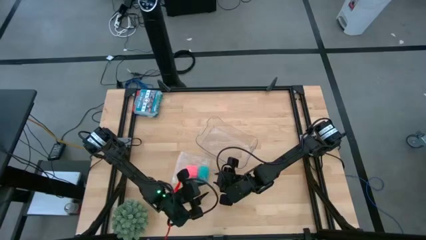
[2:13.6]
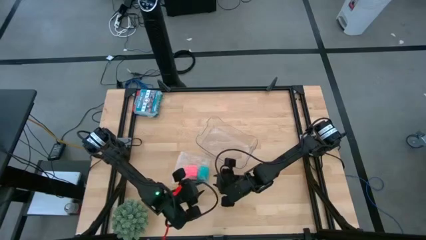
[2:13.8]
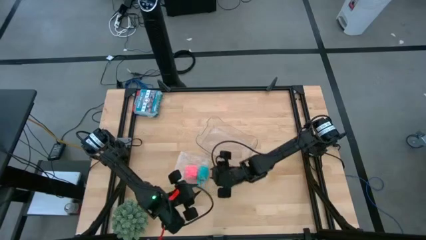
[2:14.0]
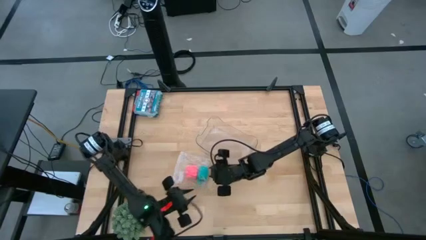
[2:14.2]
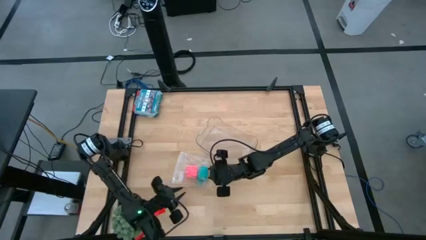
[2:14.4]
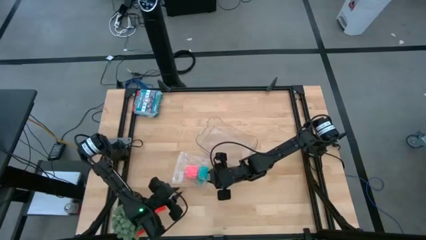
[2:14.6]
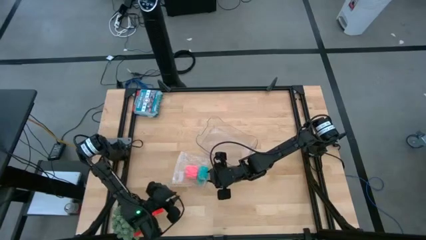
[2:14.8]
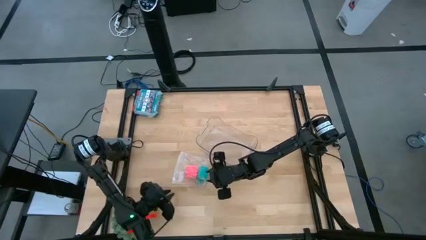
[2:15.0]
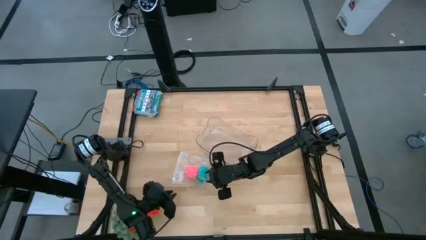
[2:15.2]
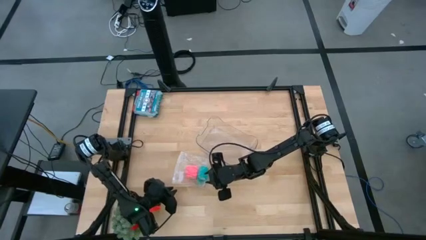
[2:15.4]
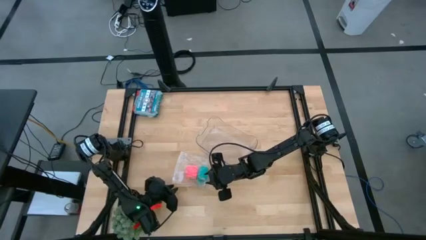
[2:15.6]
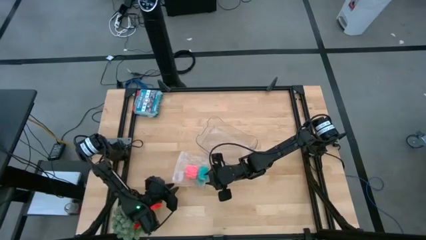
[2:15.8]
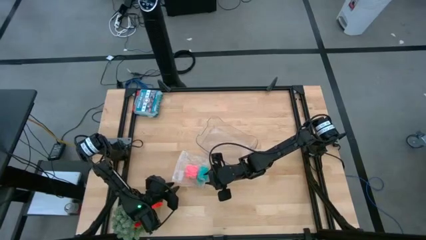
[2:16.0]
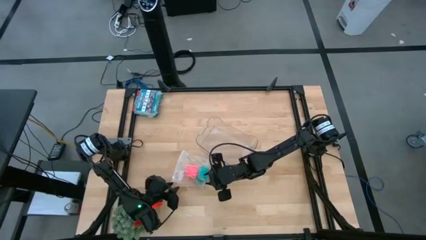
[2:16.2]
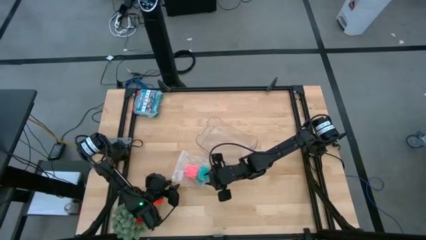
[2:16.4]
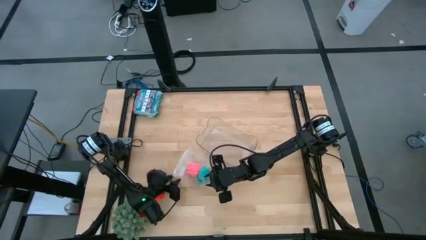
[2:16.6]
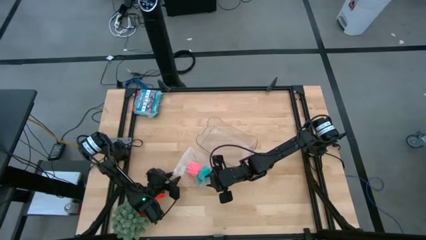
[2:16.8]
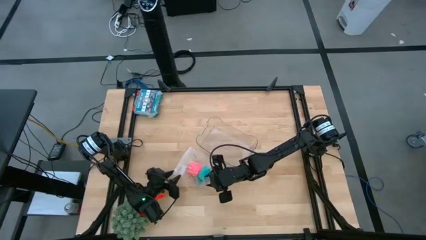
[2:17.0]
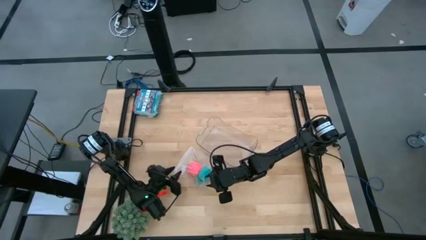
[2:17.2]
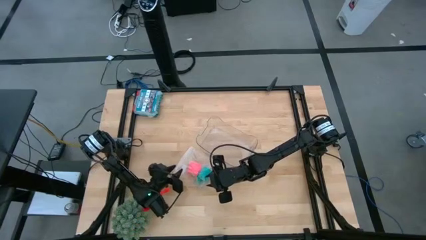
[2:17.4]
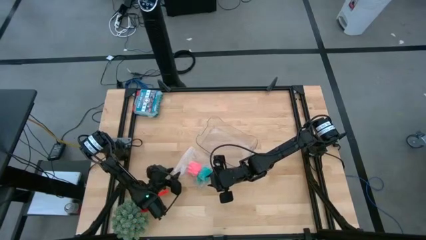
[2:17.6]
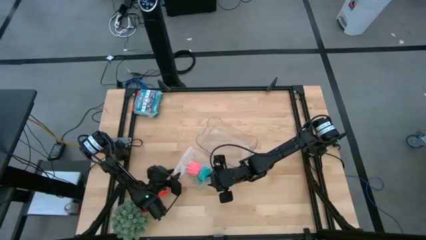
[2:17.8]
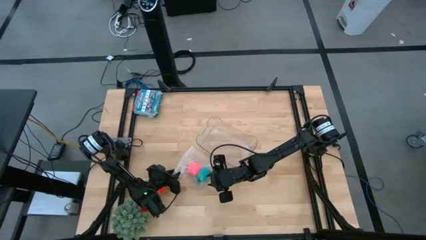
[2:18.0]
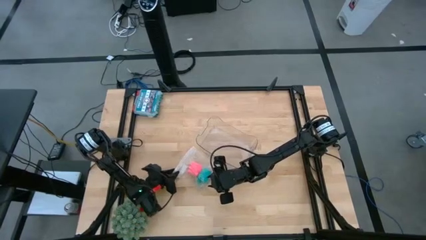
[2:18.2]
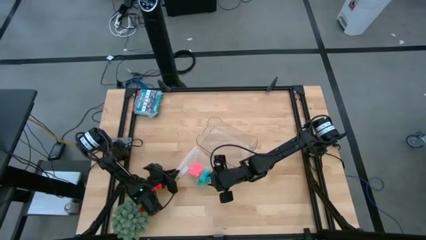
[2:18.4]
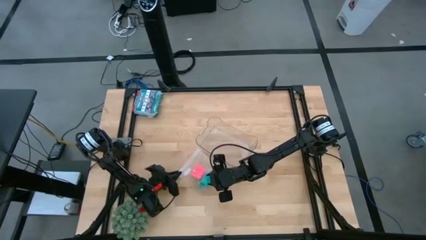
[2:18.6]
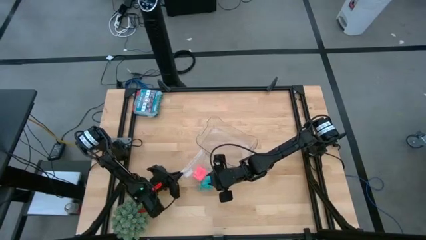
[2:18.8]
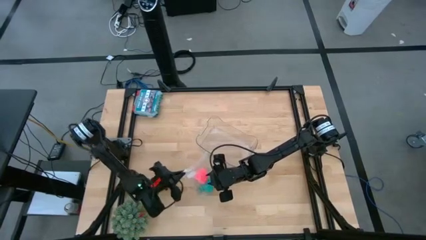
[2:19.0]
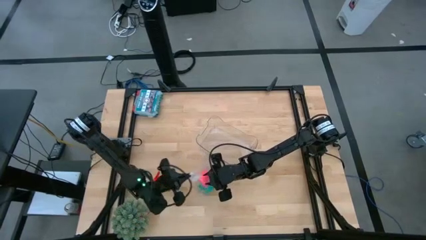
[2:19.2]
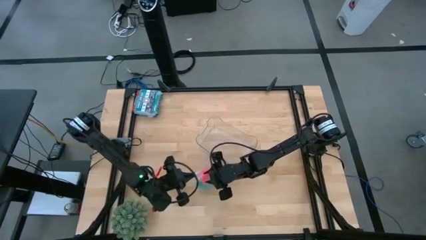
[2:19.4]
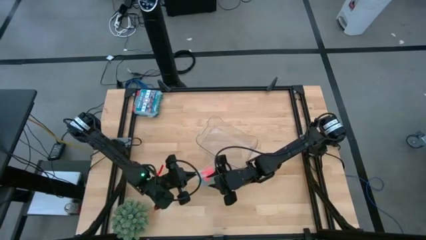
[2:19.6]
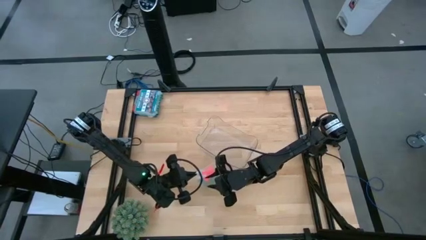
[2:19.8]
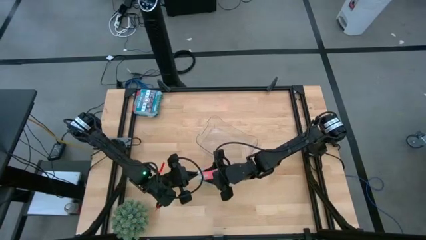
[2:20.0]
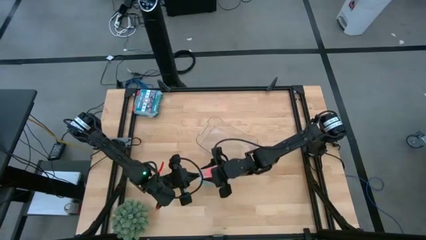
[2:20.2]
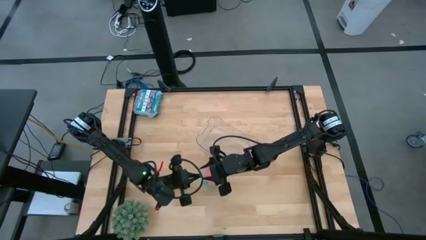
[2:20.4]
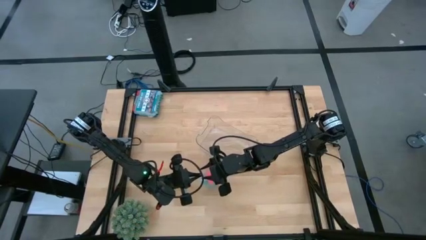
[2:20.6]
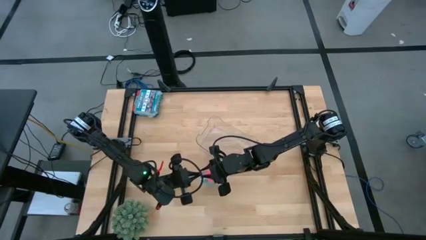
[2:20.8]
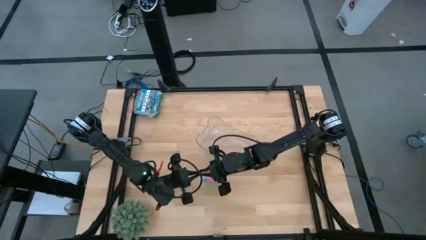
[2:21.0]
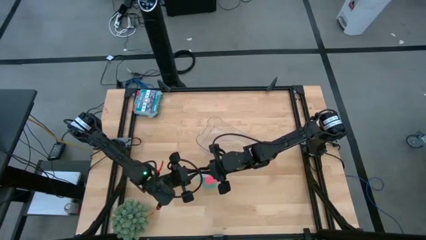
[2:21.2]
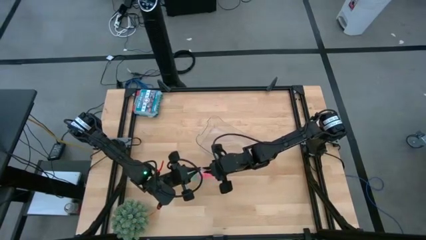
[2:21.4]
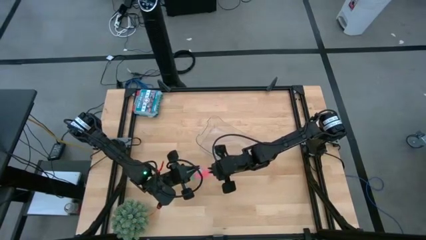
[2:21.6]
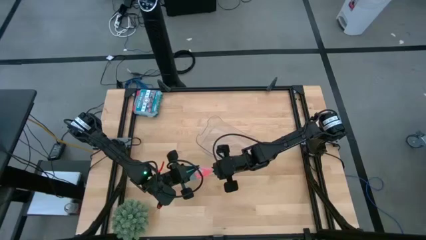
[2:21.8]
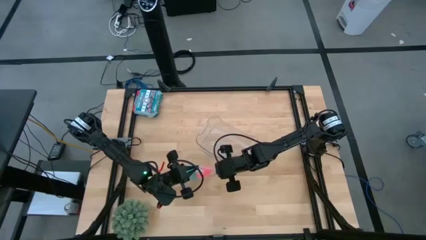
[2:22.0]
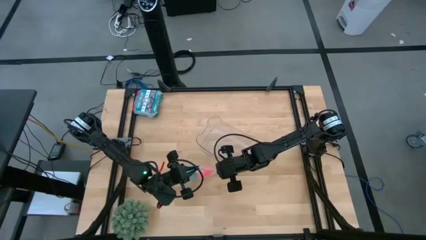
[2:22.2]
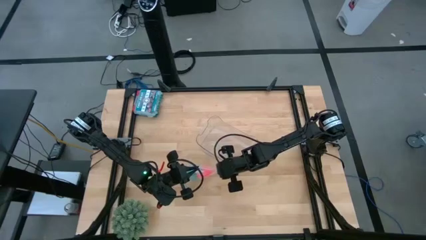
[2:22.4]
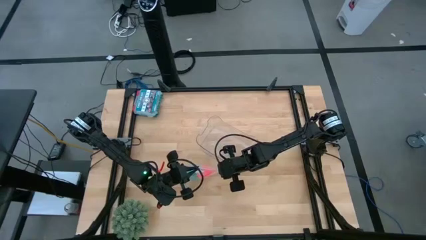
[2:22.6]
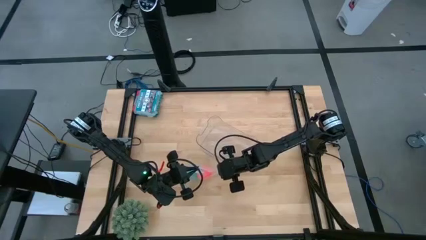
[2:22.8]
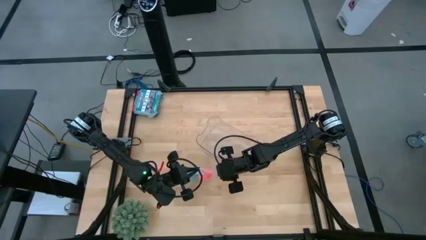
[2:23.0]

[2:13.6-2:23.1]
Task: Roll bandage
Close the transparent zip bag

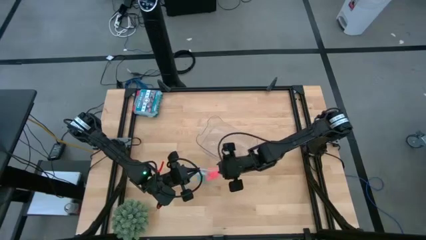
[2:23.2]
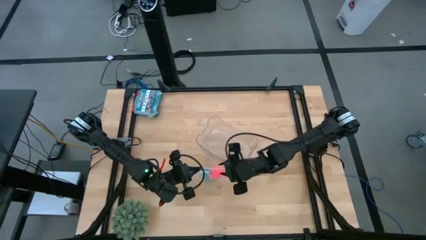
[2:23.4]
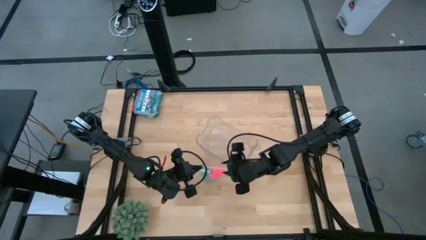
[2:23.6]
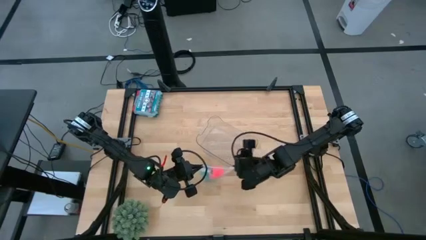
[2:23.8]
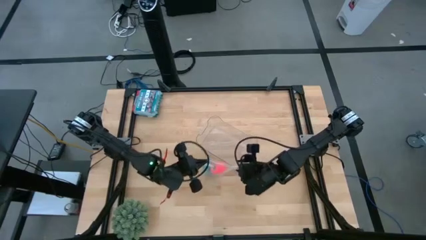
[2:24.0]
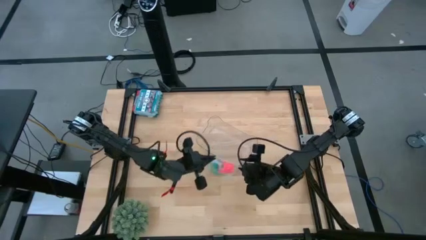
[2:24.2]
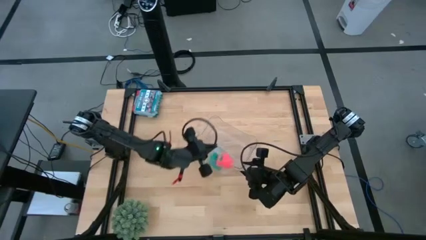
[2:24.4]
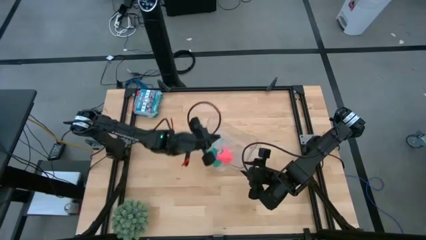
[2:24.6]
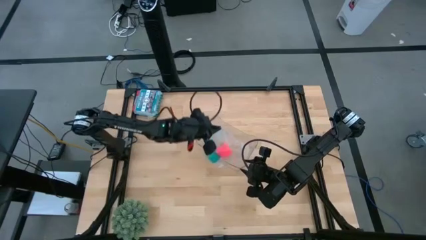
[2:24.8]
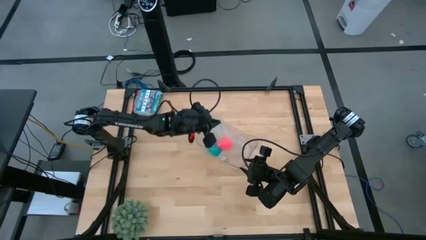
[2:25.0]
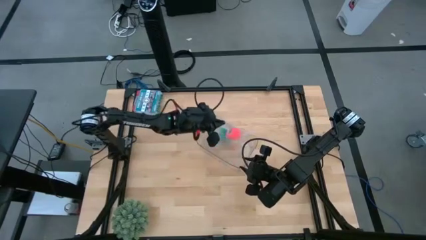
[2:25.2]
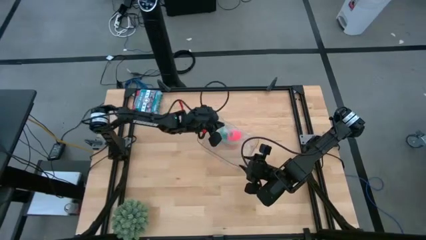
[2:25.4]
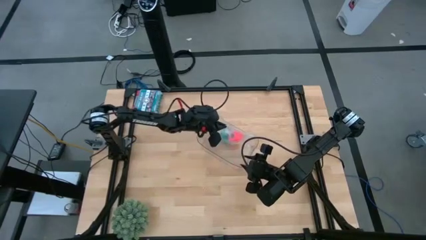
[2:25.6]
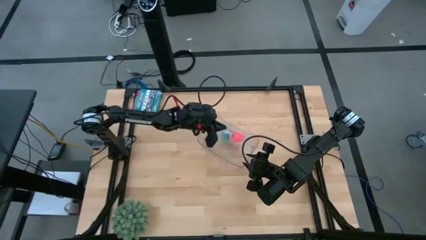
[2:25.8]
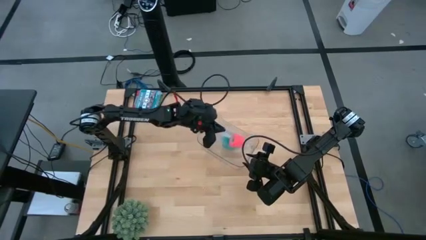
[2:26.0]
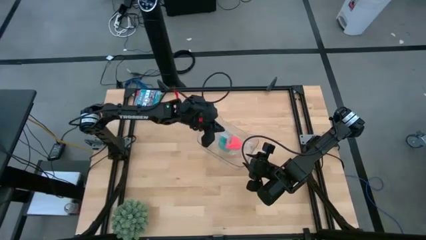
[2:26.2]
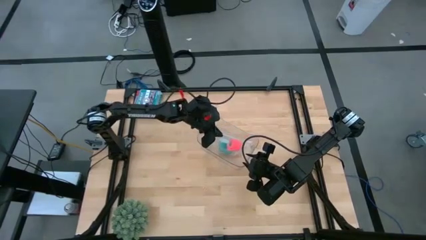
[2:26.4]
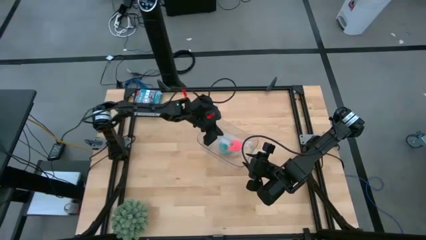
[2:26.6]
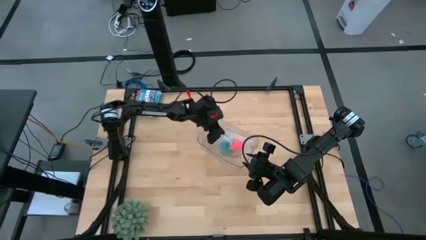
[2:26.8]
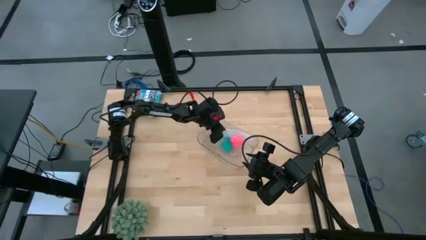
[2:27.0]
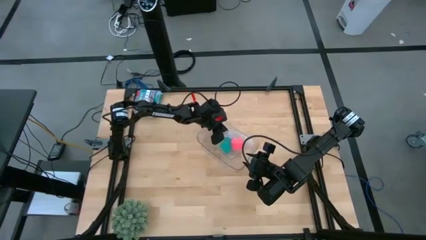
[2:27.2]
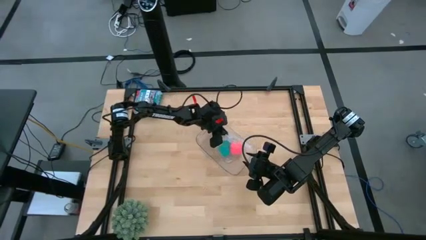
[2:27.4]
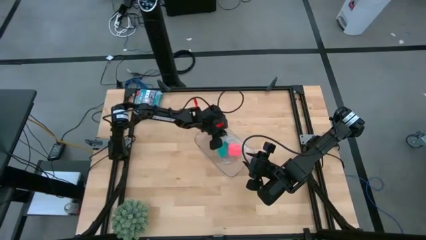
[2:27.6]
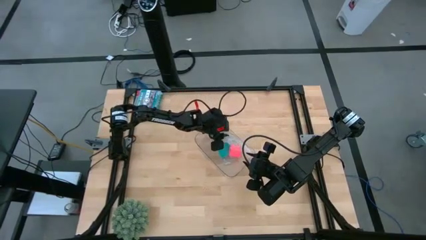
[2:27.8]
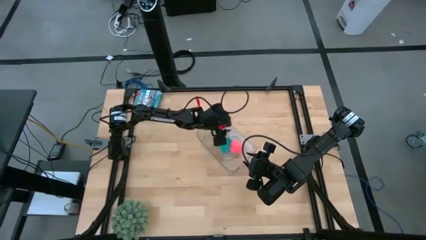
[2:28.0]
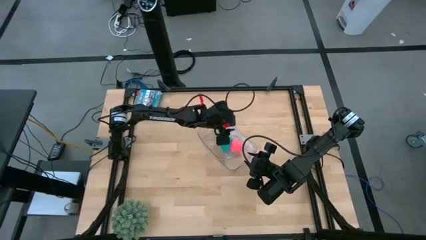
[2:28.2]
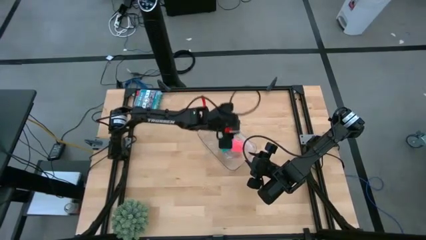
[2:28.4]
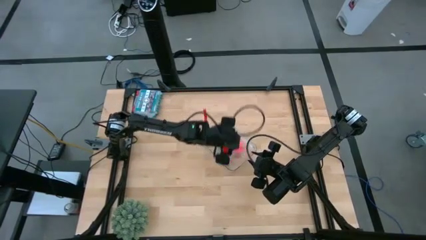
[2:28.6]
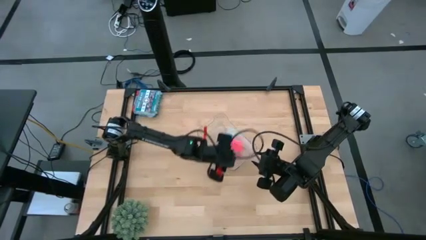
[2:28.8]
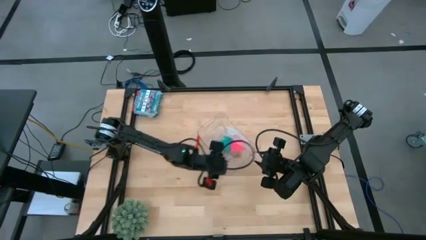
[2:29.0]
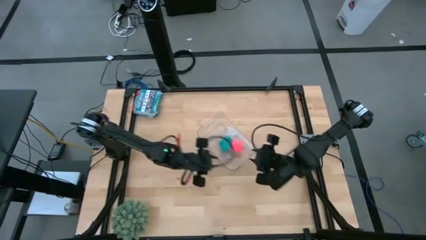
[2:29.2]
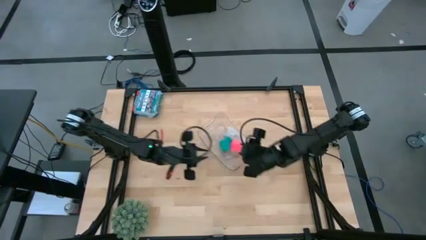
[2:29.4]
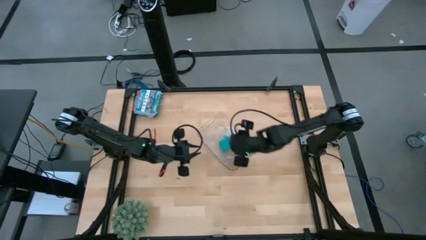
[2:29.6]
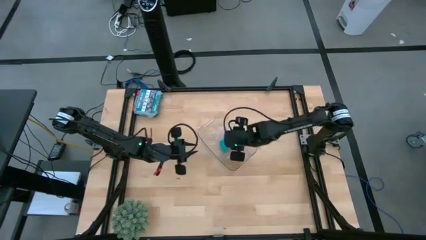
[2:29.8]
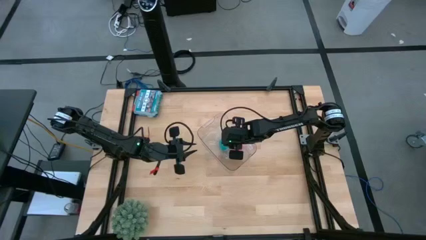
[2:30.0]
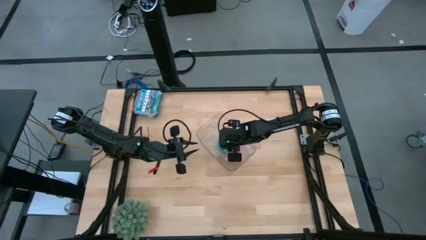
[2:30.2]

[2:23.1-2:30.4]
Put the transparent zip bag into the bin

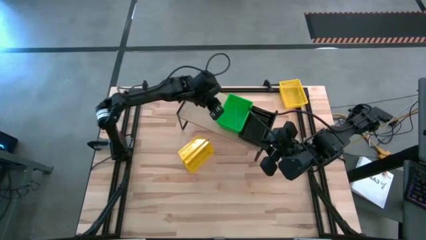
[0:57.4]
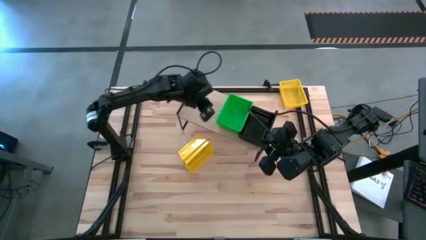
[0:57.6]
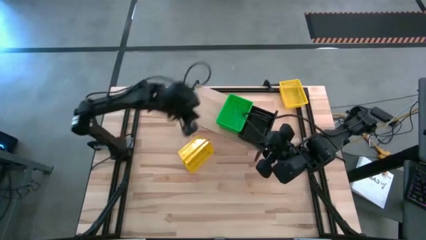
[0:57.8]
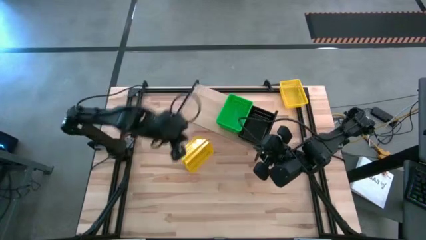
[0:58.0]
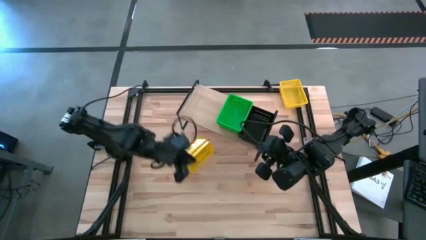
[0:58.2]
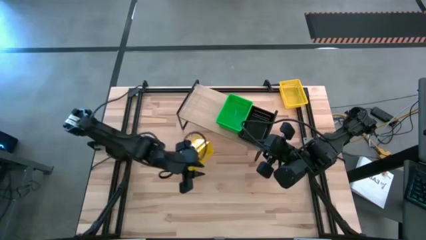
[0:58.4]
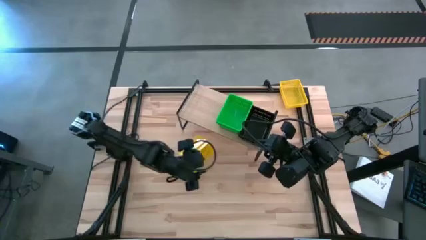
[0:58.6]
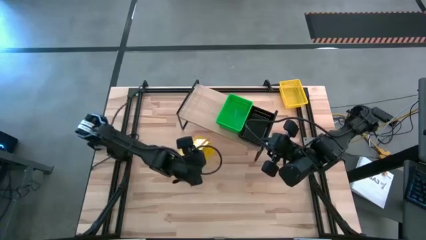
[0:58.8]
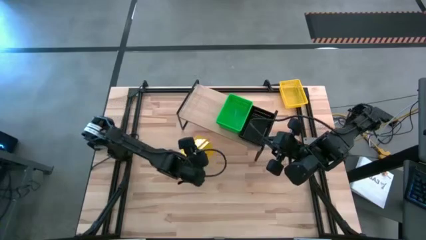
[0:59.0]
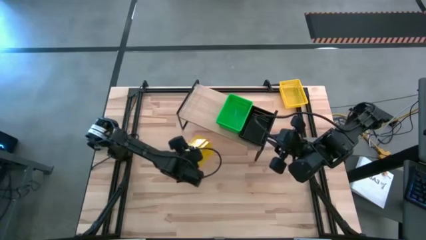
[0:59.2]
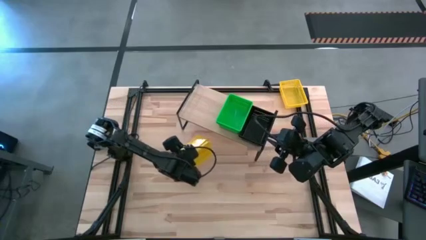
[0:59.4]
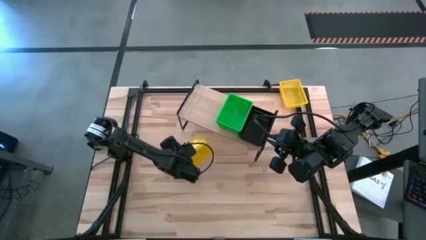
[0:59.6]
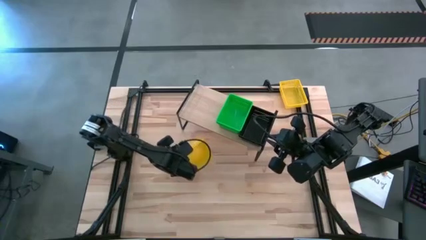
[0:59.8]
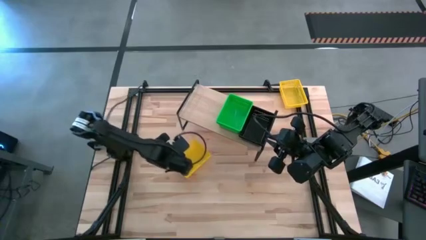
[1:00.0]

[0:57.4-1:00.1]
Task: Stack baskets on shelf by color
Put the stacked yellow bins on the shelf
